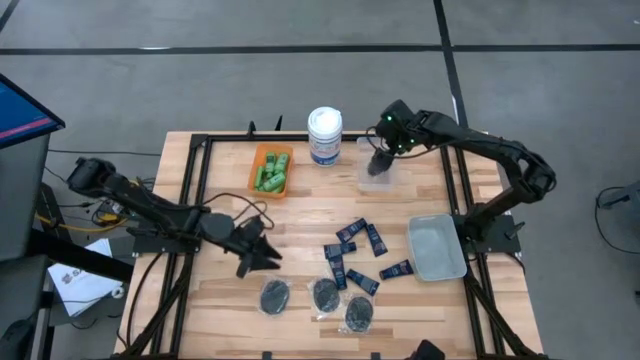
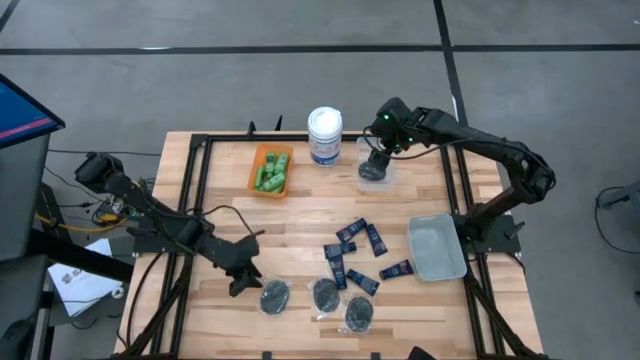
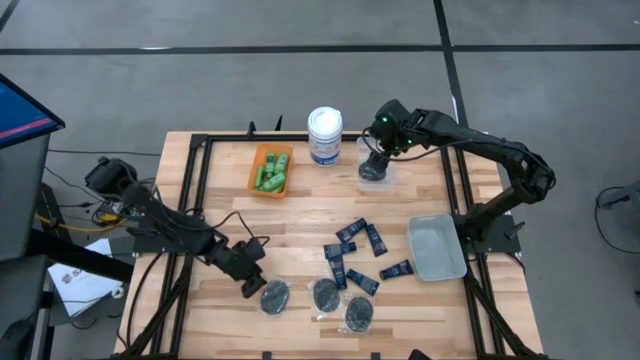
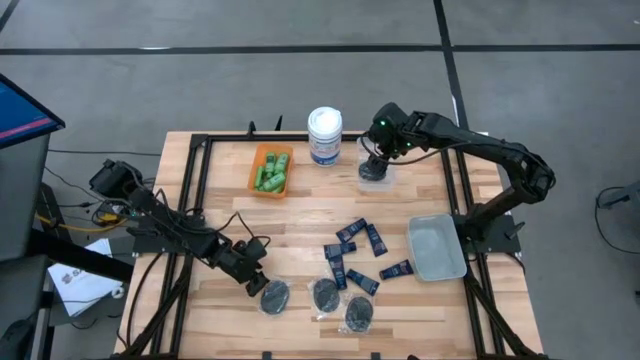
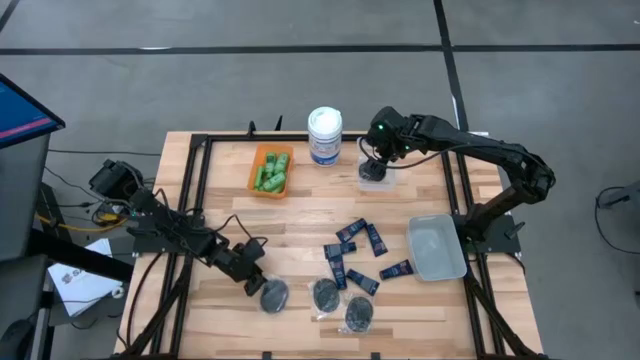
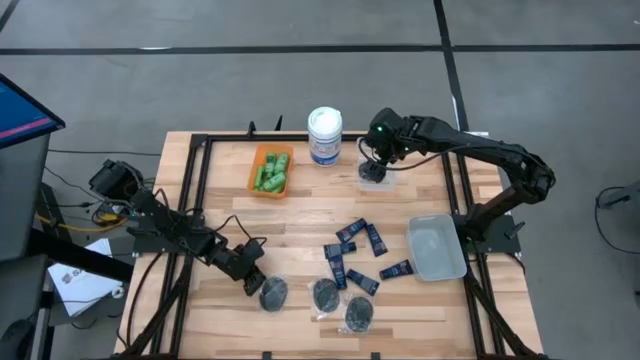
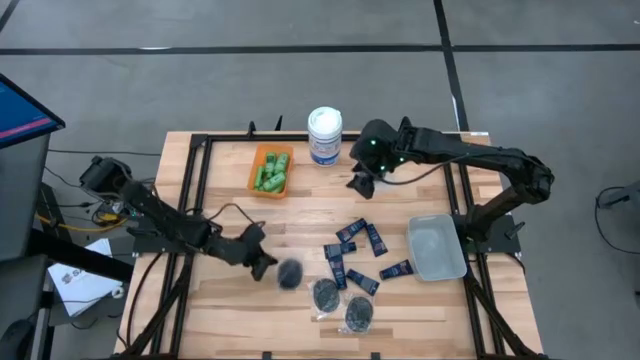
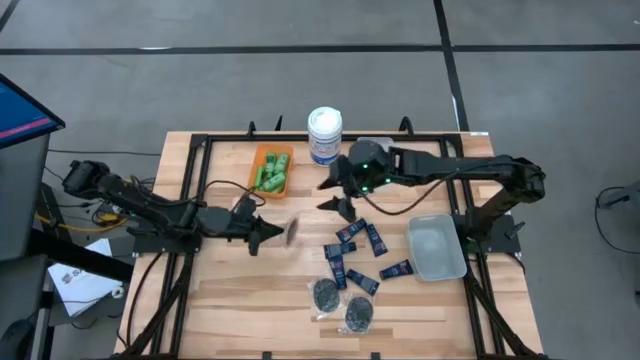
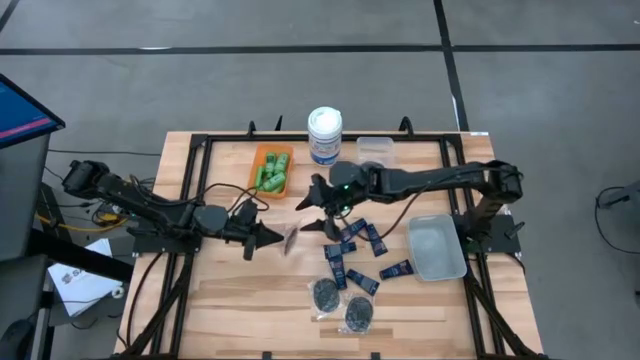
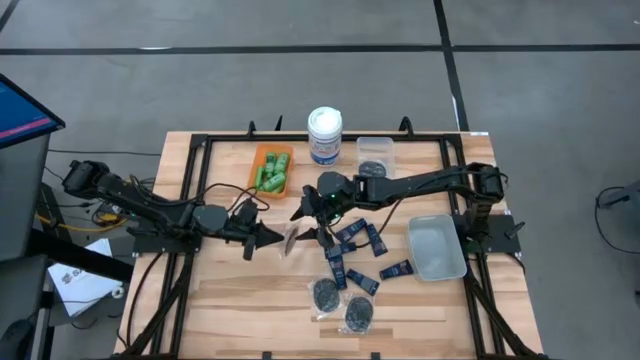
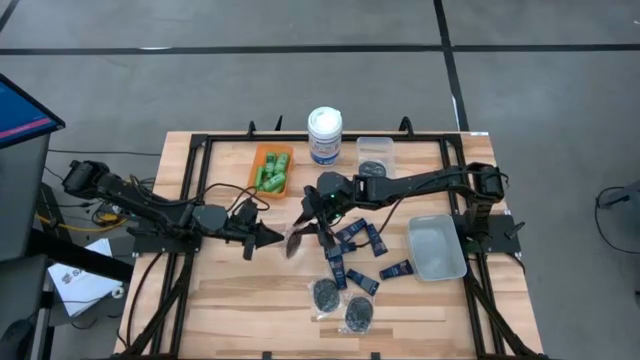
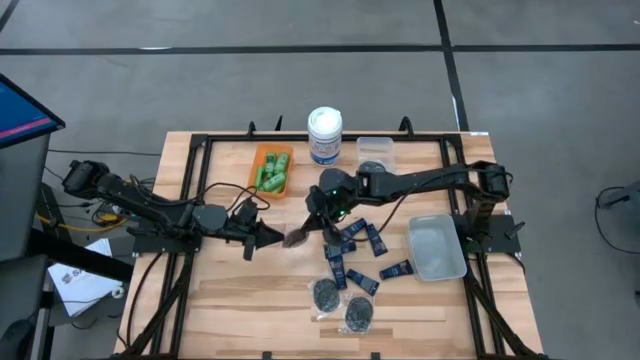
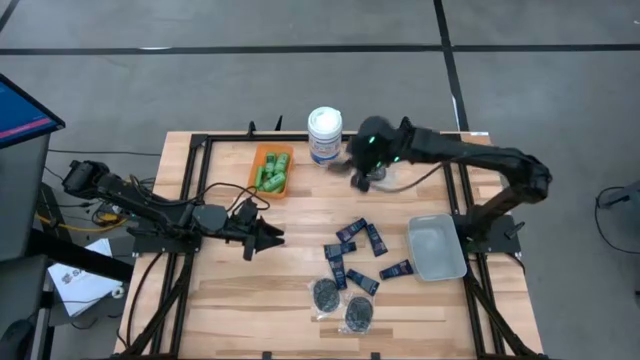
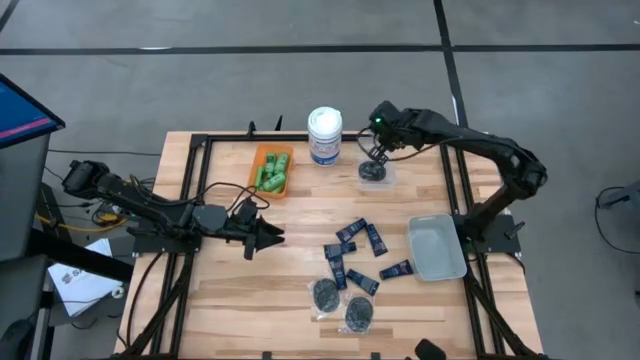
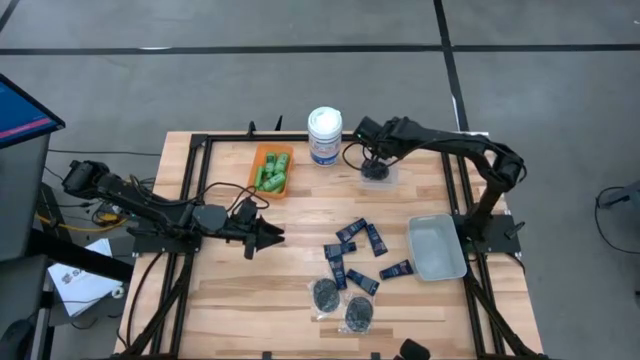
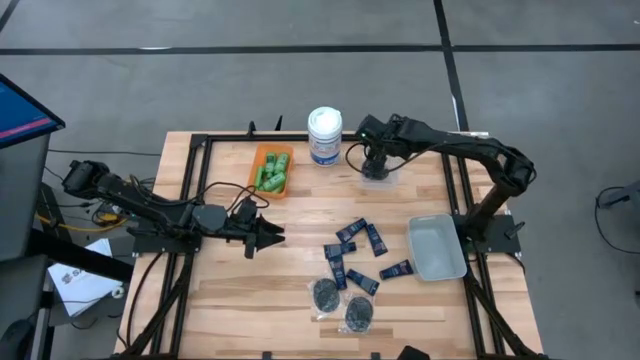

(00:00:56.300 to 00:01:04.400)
Task: Pick & Place Travel size toiletries
Put the black hairbrush into the white bin

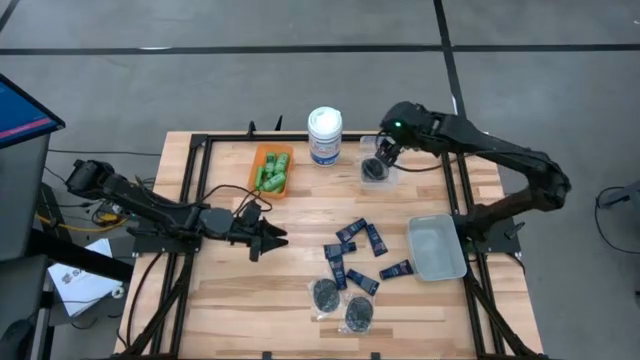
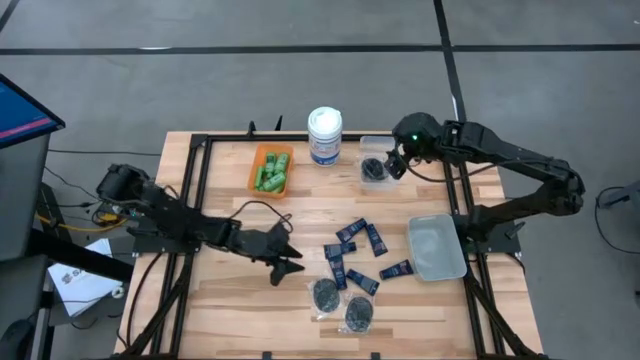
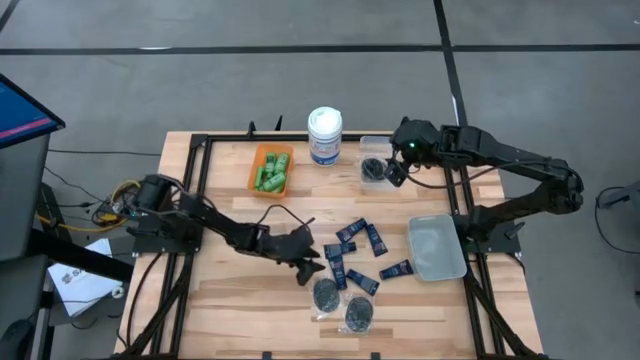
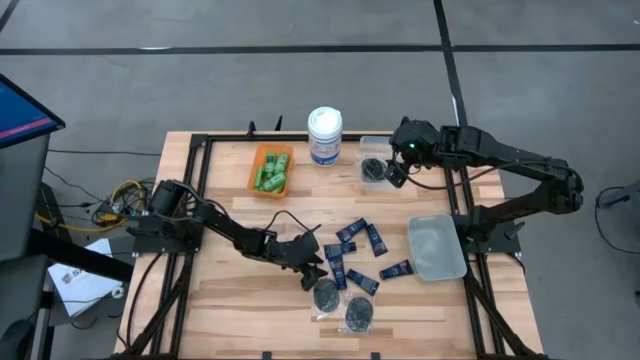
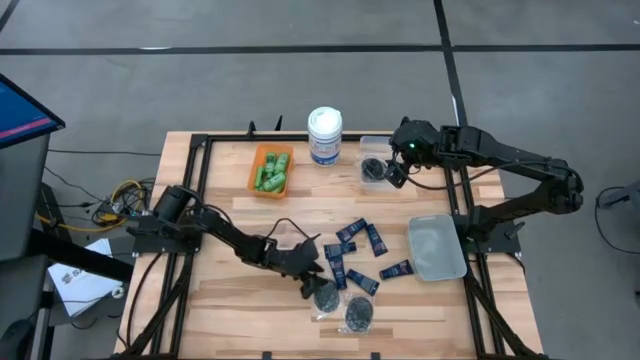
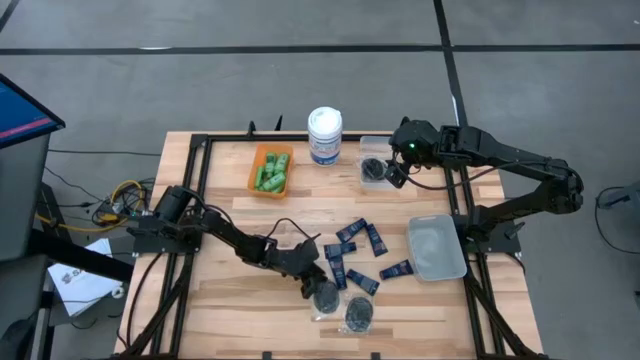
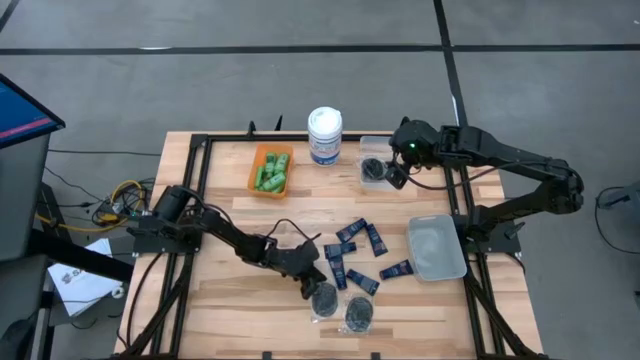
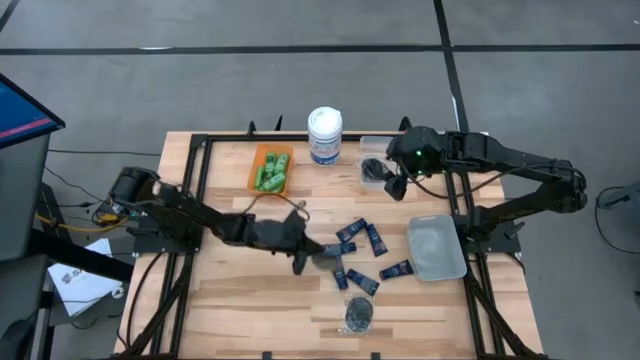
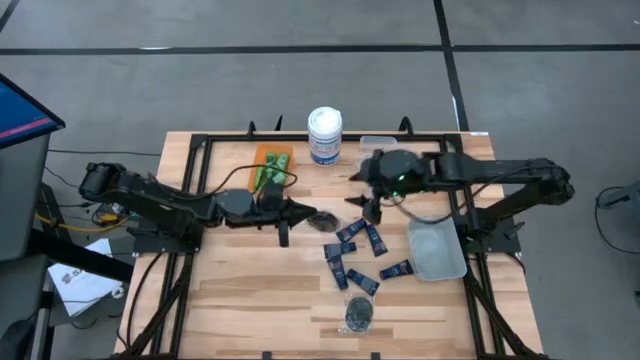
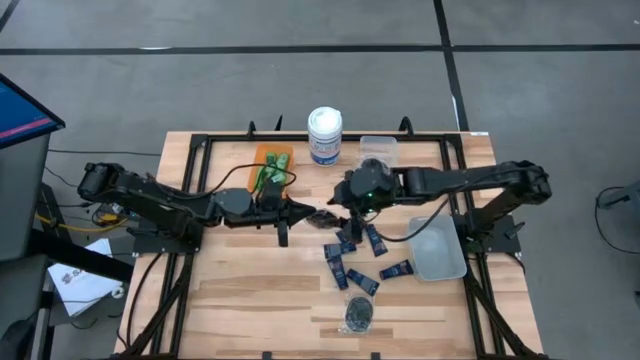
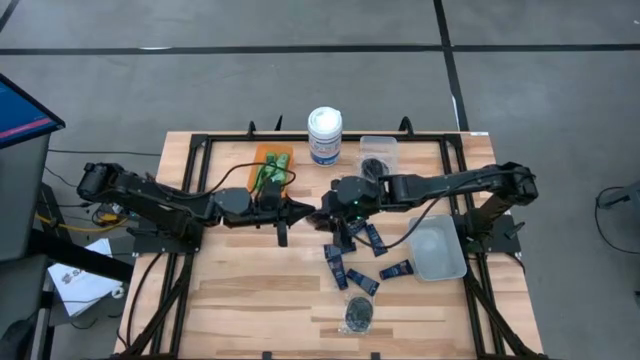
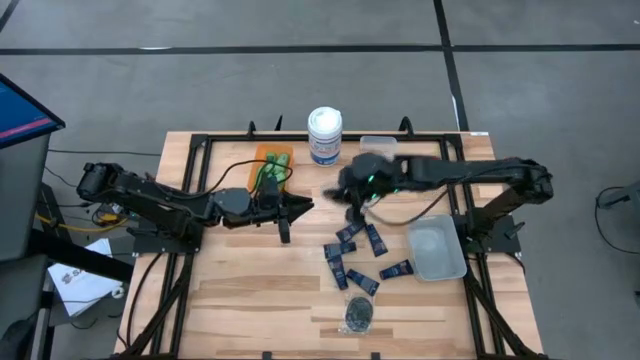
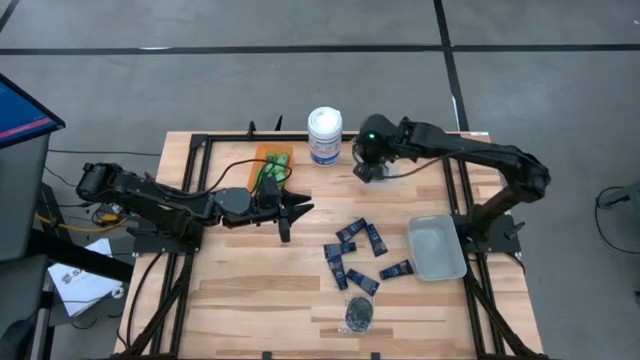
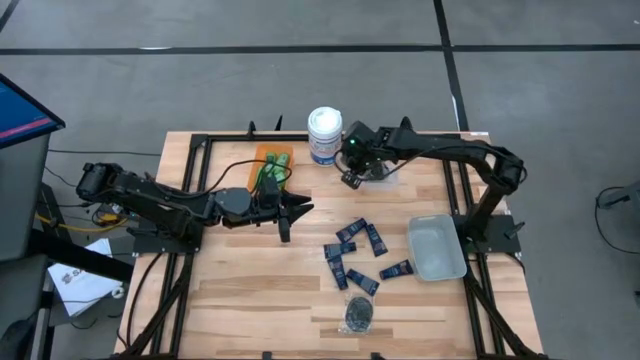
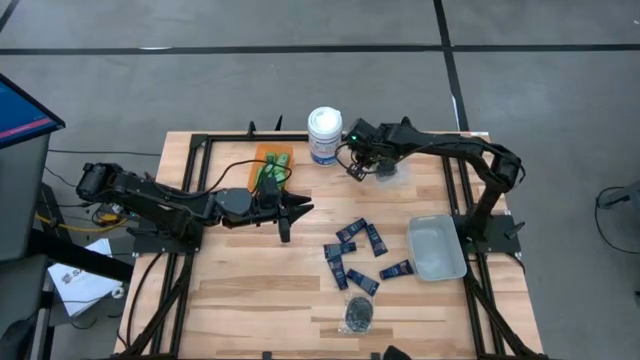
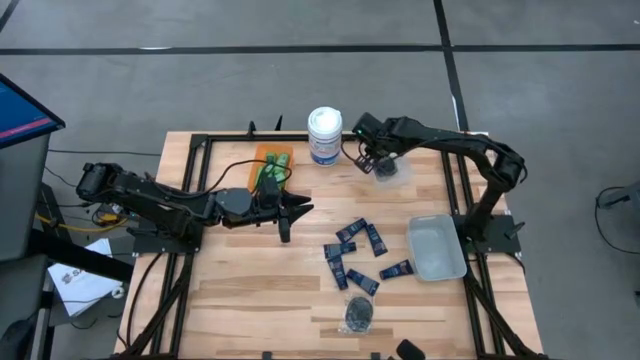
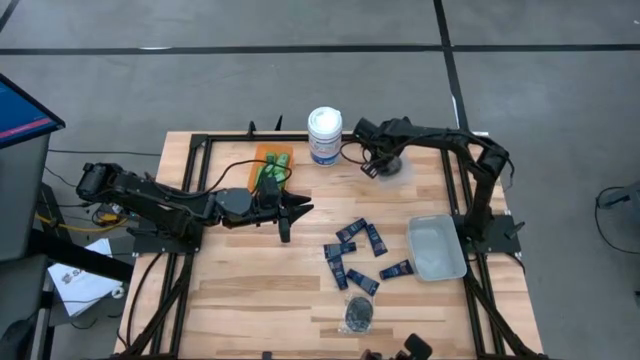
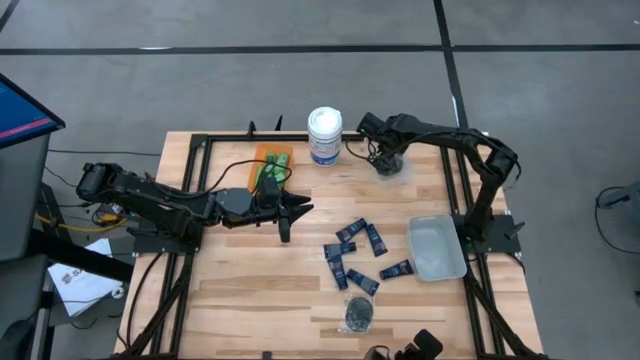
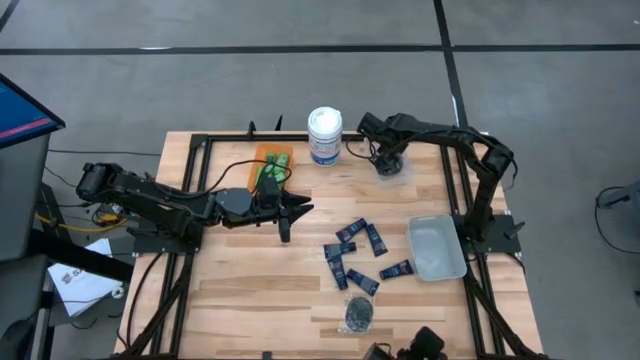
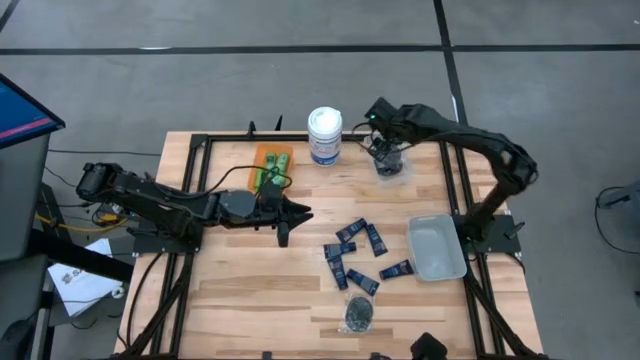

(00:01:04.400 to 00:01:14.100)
Put the hair brush into the white transparent bin

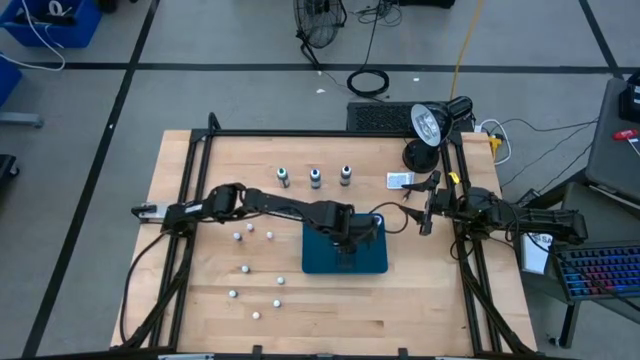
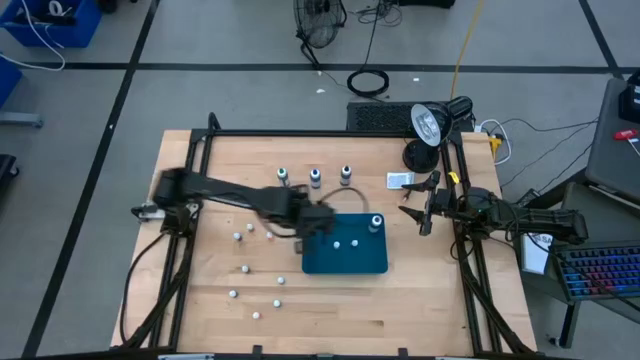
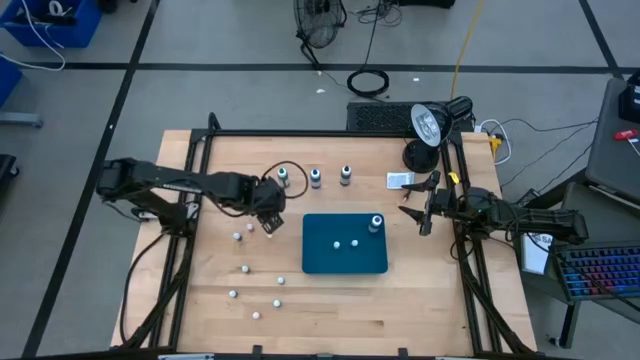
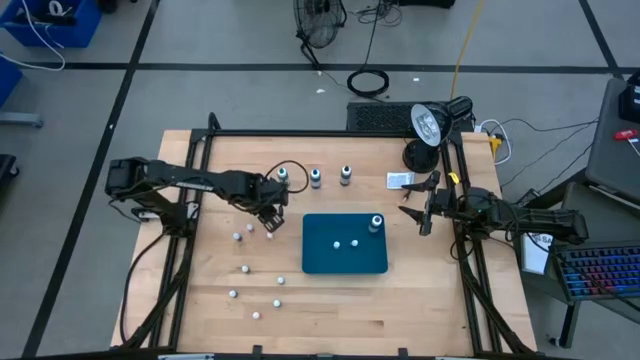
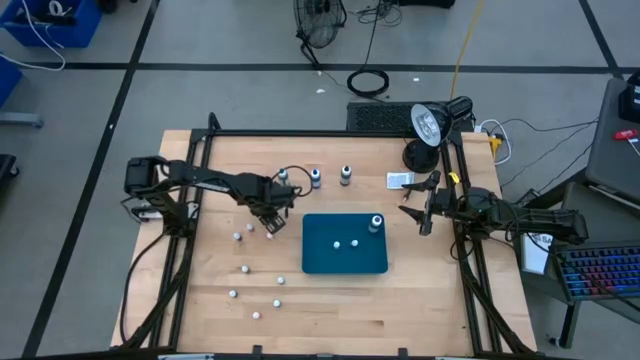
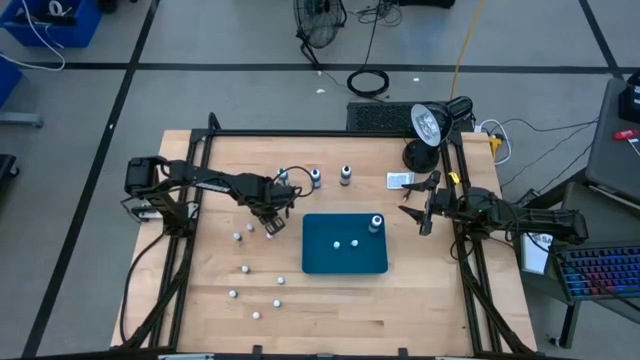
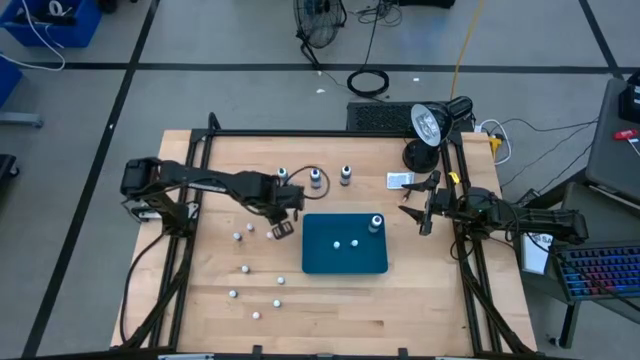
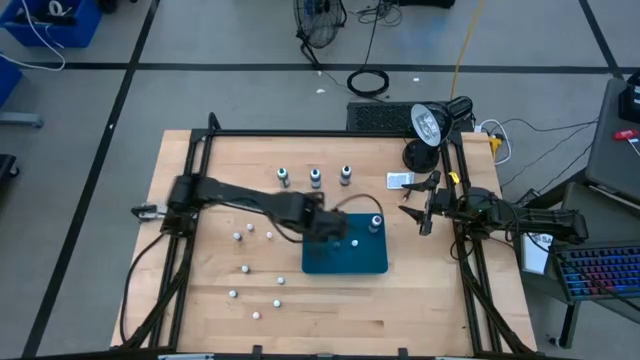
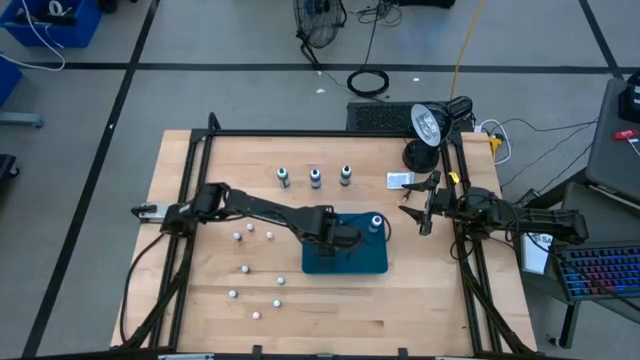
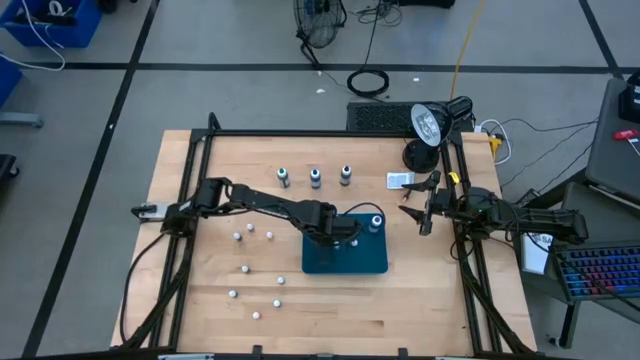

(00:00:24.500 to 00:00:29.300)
Task: Pick & Place food coloring
Put the top small orange food coloring bottle into the blue bin
